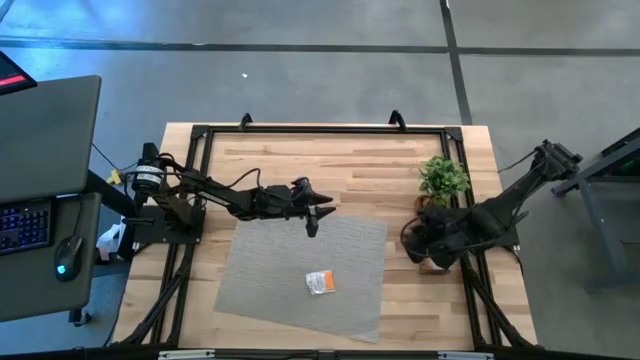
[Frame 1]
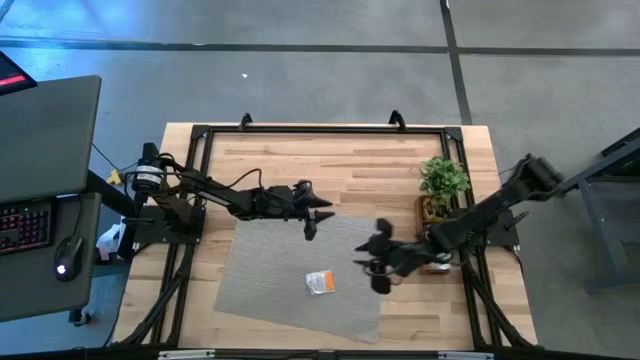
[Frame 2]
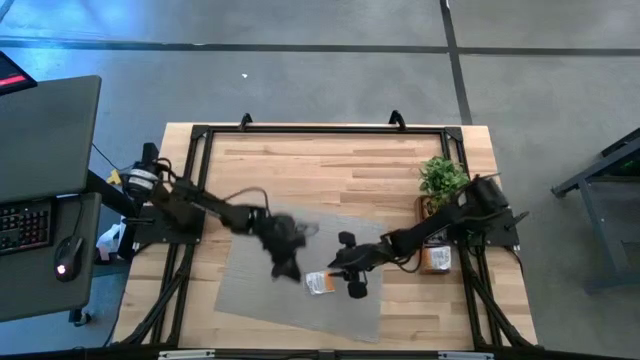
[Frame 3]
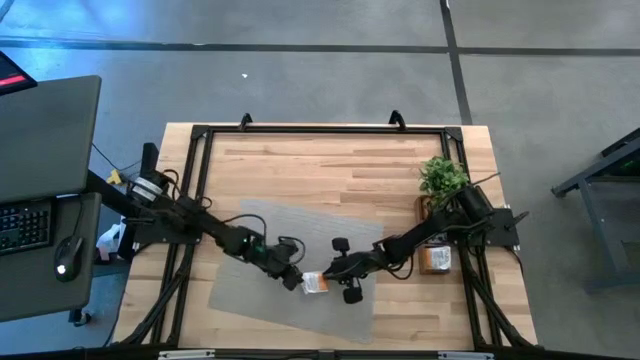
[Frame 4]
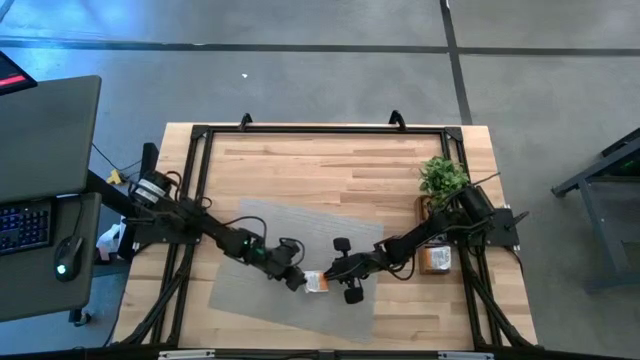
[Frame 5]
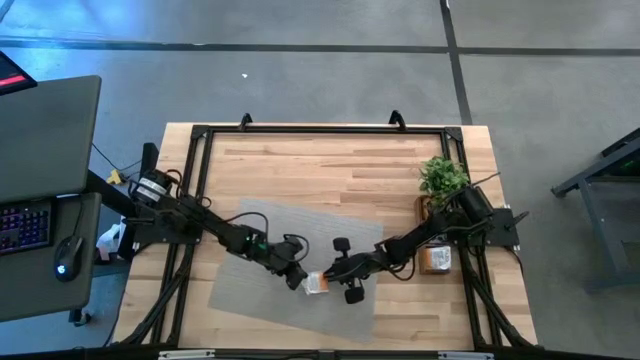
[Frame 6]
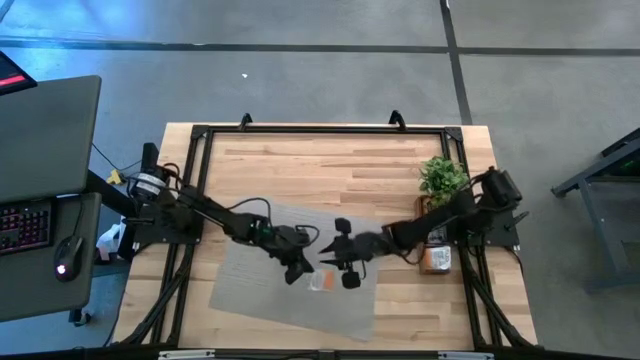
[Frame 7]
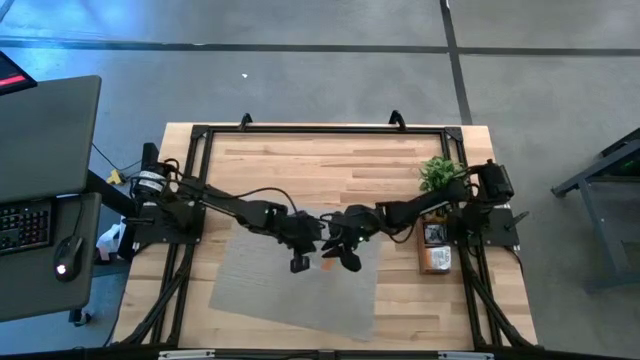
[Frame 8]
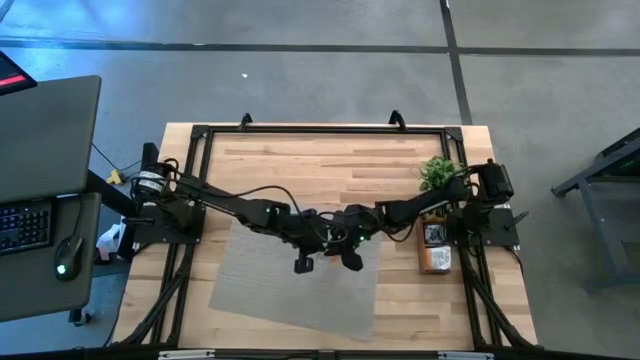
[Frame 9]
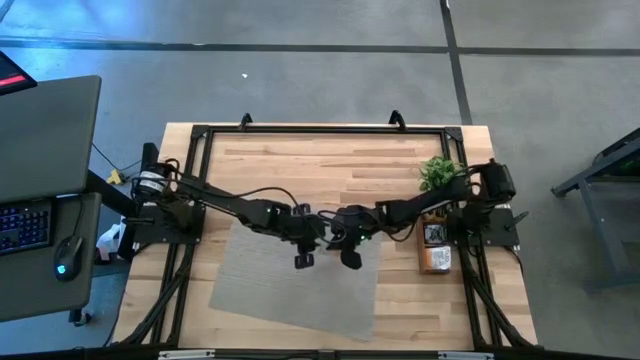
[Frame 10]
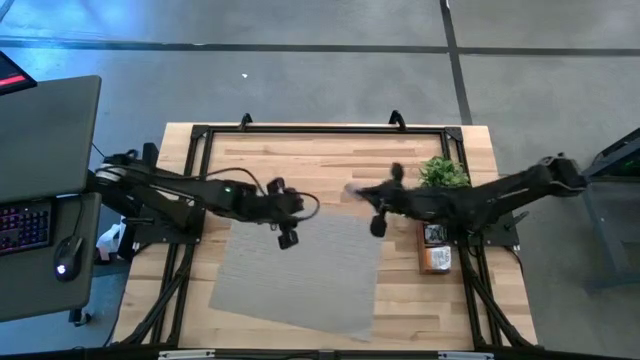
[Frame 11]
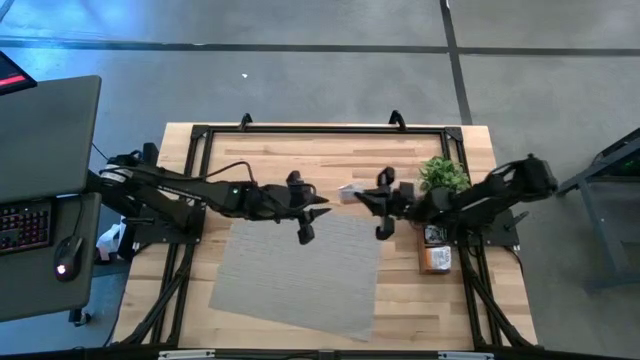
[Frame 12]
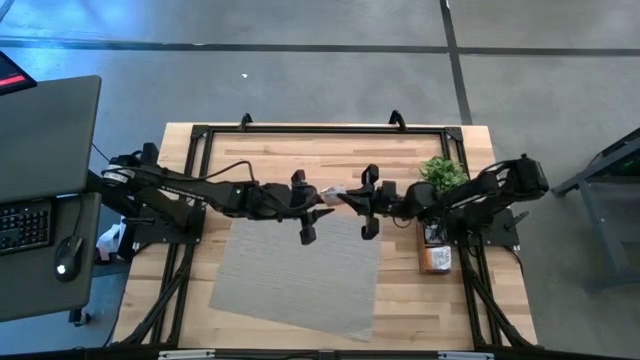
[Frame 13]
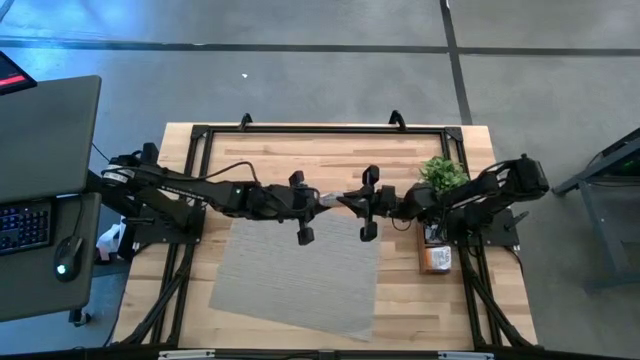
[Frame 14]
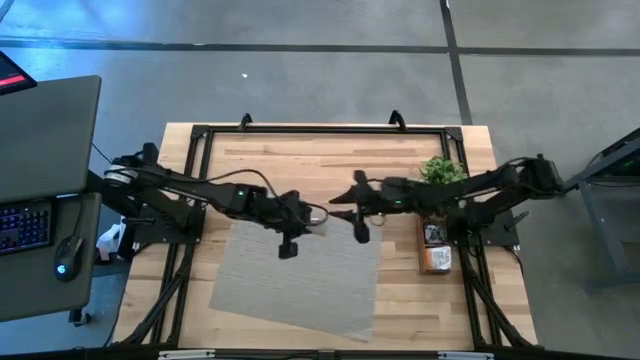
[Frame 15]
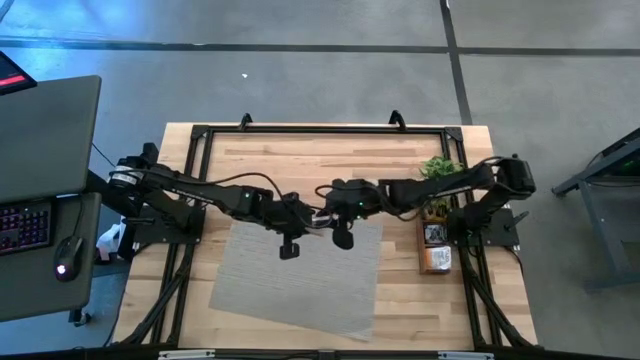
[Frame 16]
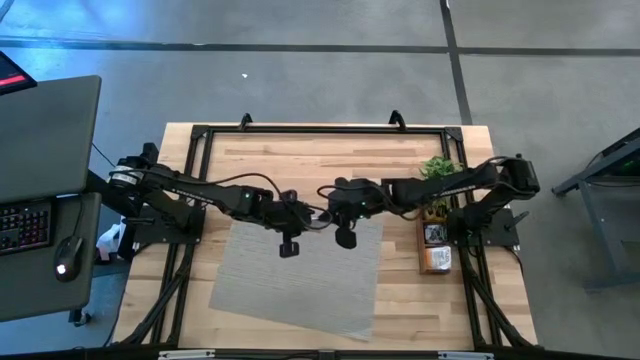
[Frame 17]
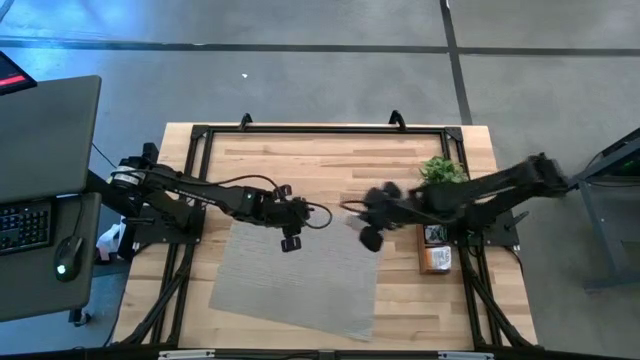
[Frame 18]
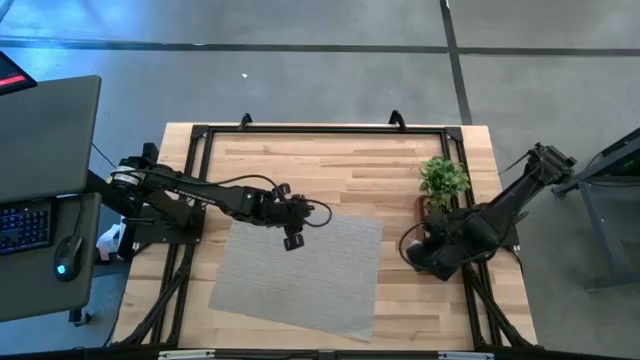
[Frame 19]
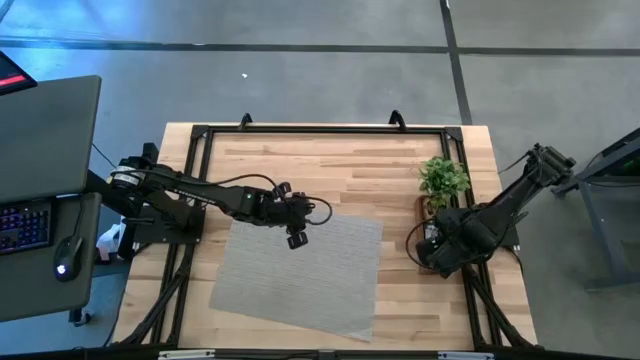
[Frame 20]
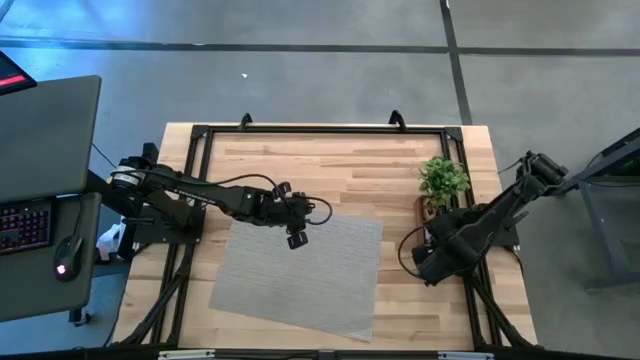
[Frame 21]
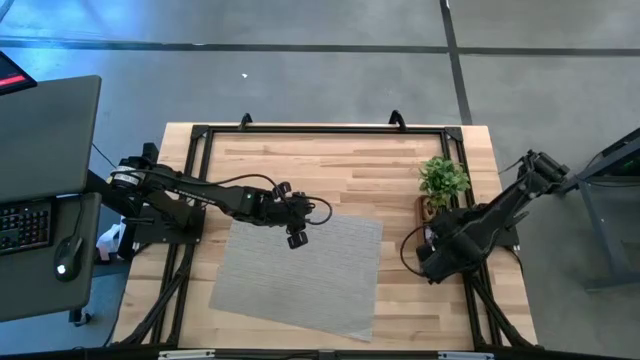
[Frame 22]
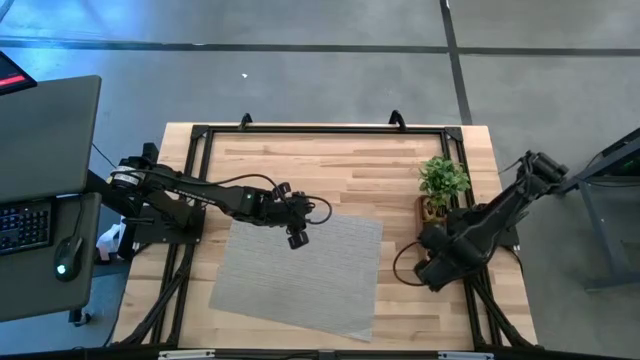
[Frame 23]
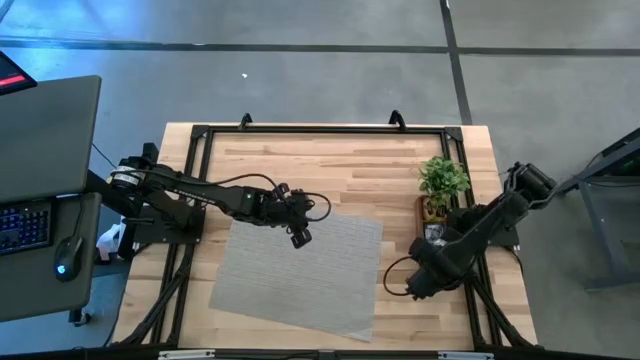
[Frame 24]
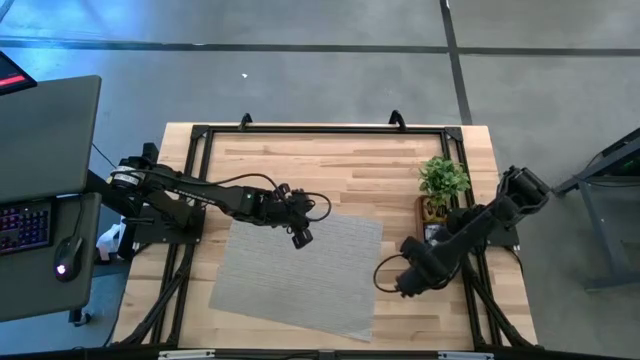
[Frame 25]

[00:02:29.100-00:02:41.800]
Task: Pick & Place Tea
Put the white tea bag into the bottom section of the wooden organizer

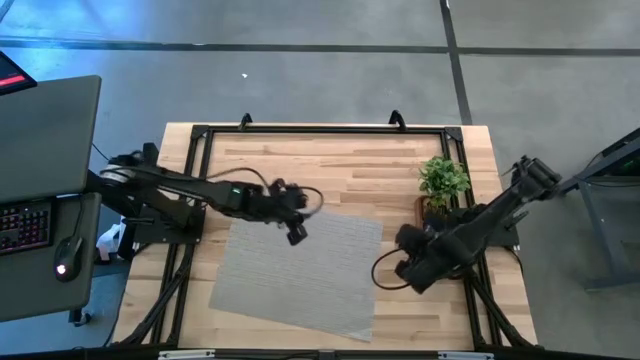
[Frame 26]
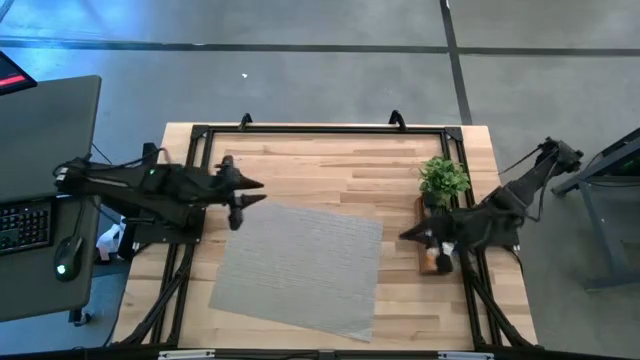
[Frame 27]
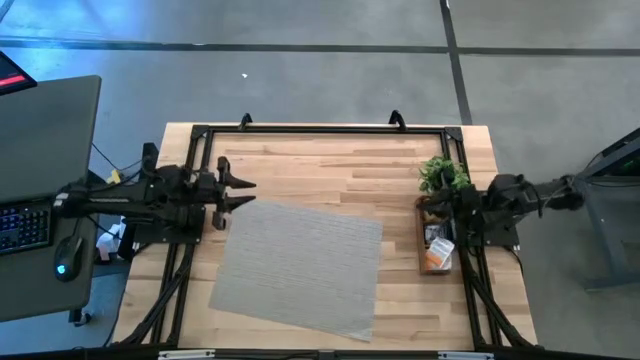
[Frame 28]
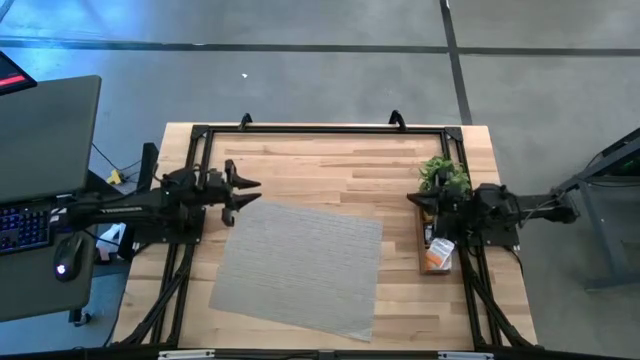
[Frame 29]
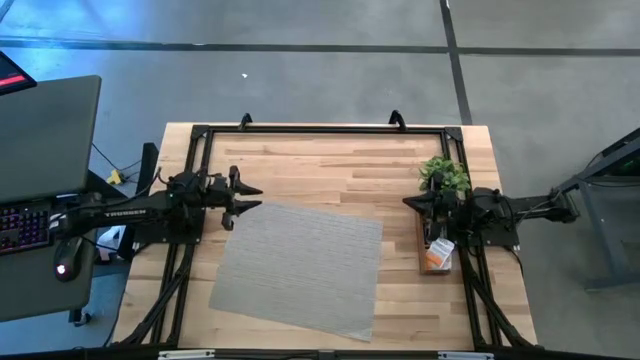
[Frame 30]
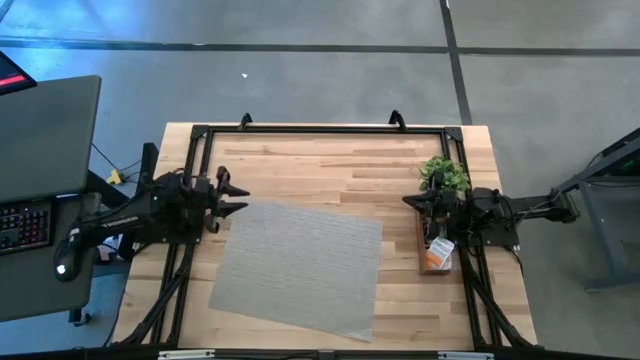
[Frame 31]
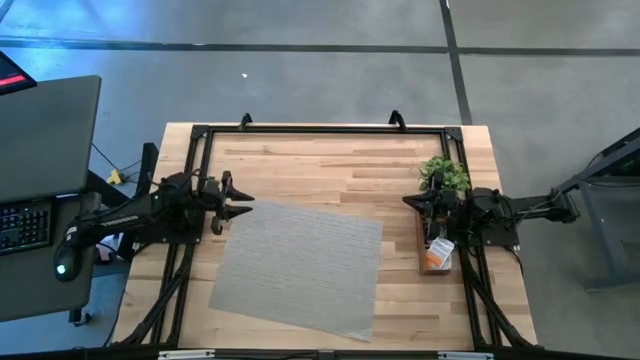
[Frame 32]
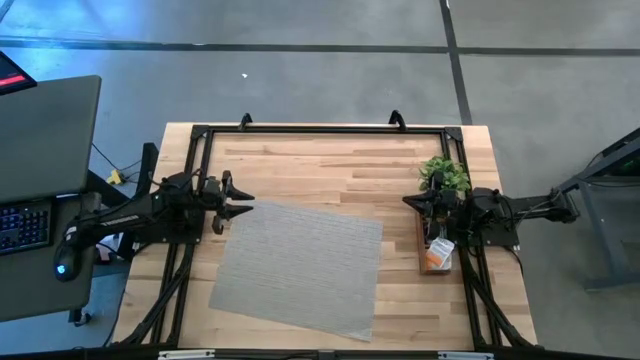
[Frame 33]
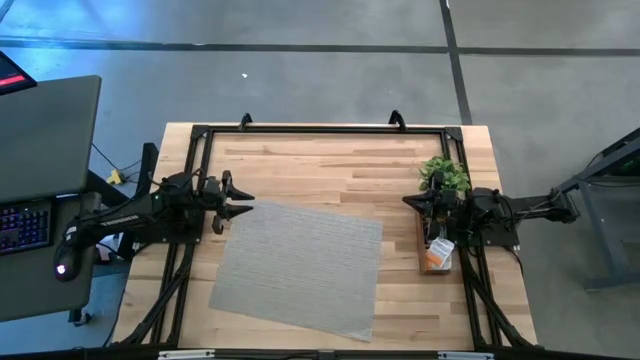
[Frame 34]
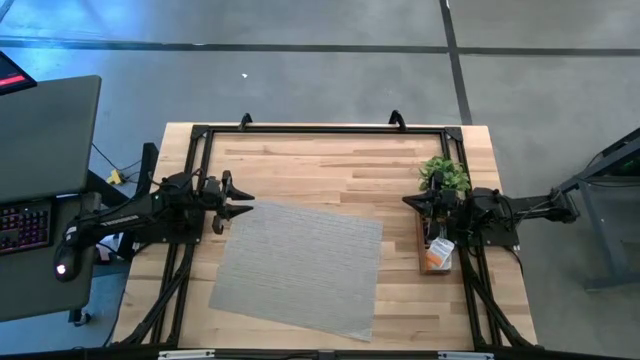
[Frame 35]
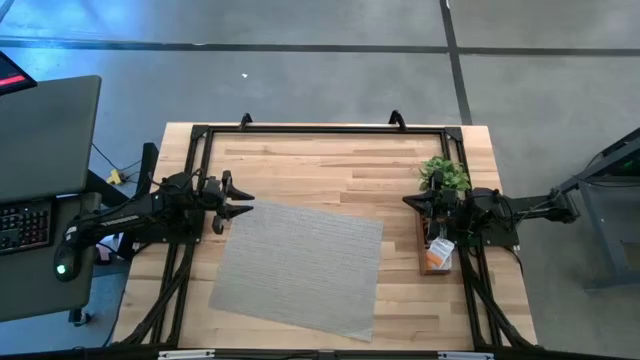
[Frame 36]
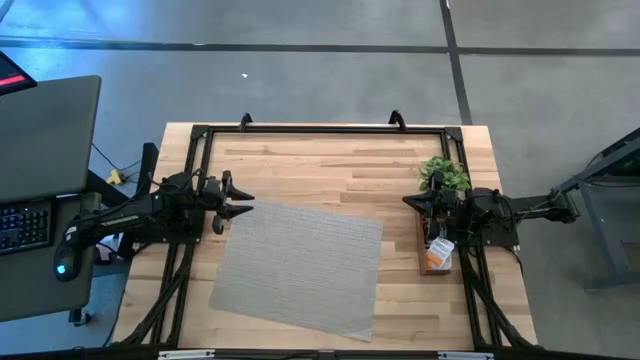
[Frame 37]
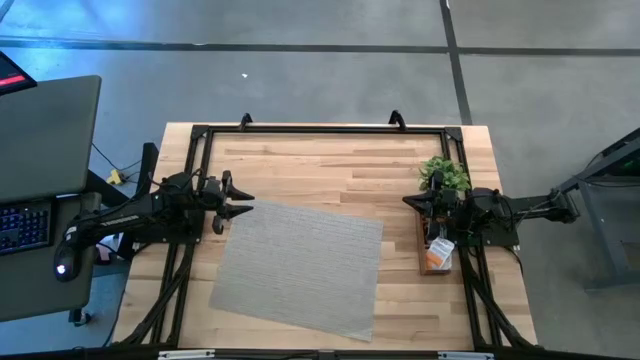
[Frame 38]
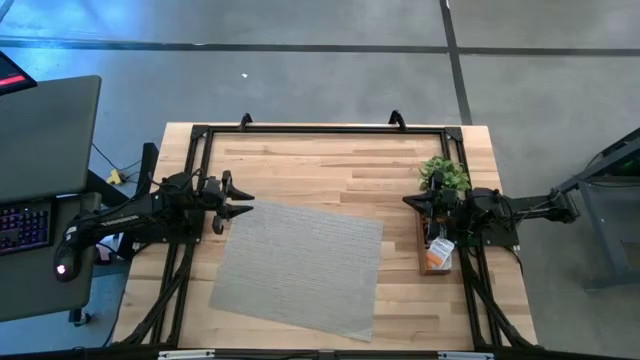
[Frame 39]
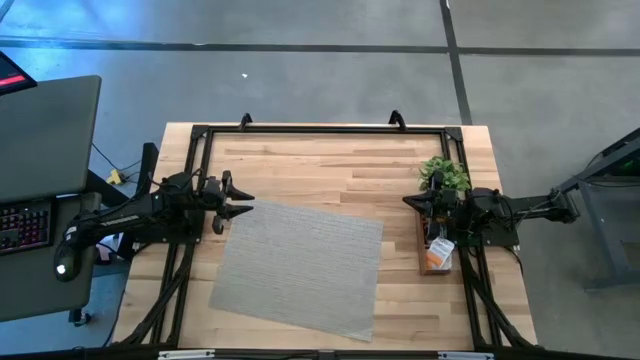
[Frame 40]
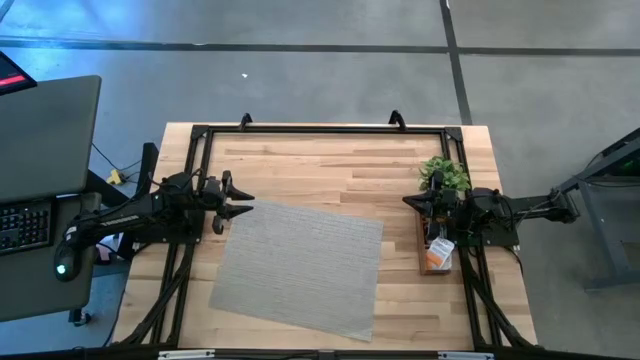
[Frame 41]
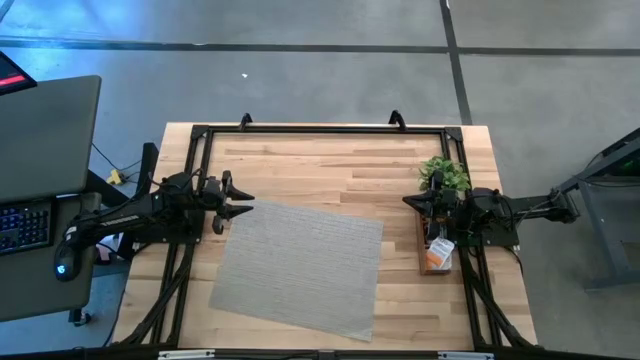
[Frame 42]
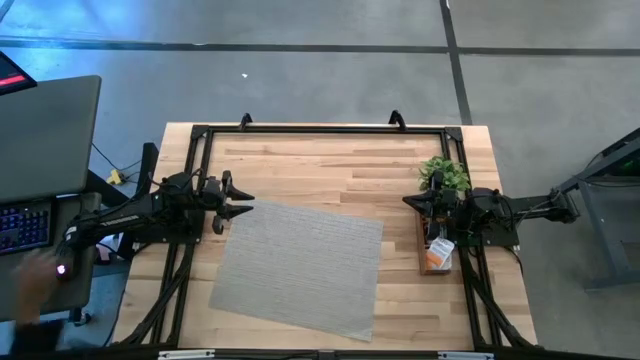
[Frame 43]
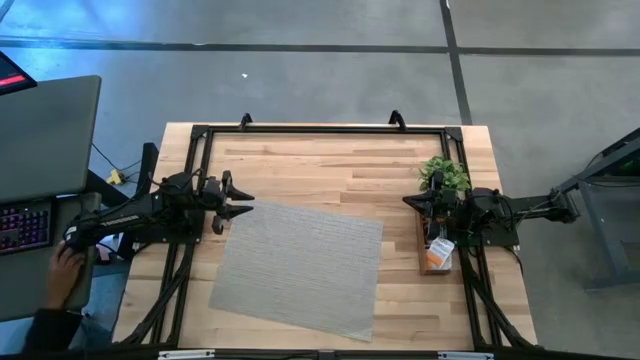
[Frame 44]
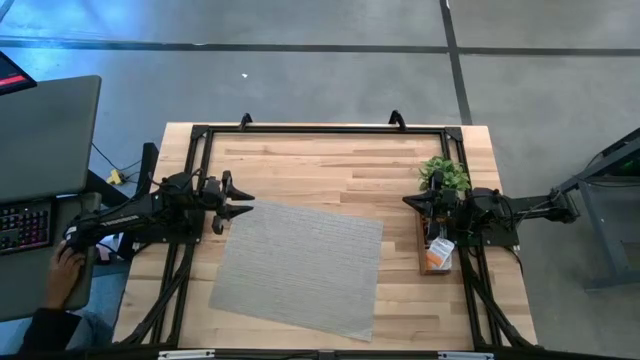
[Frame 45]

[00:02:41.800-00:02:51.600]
Return to Home Position
